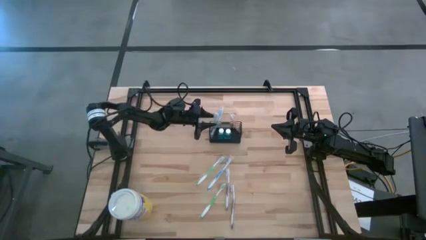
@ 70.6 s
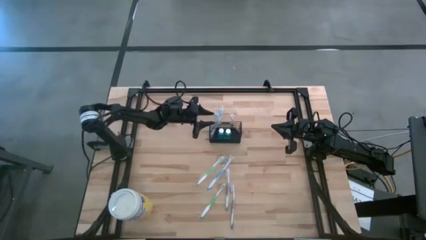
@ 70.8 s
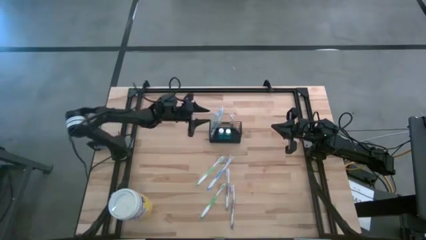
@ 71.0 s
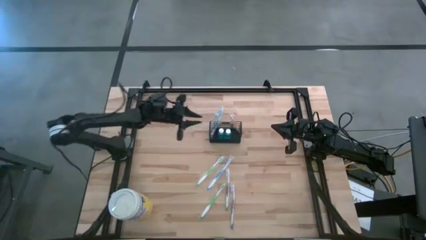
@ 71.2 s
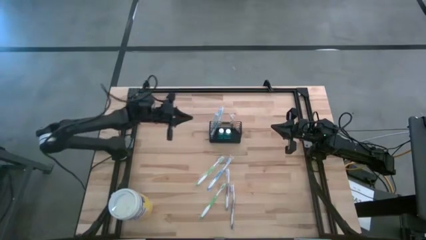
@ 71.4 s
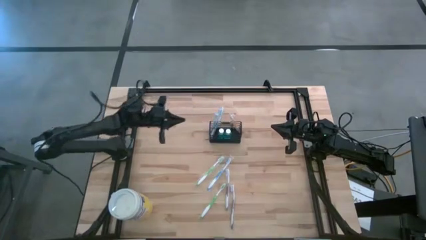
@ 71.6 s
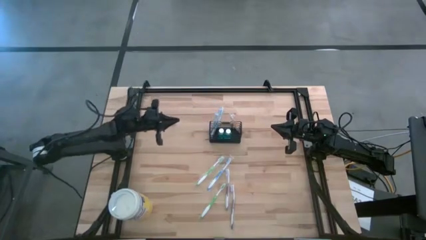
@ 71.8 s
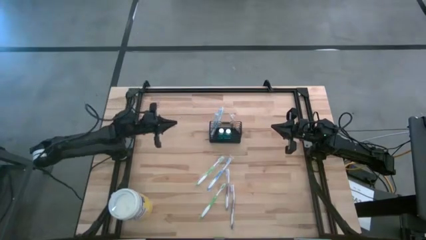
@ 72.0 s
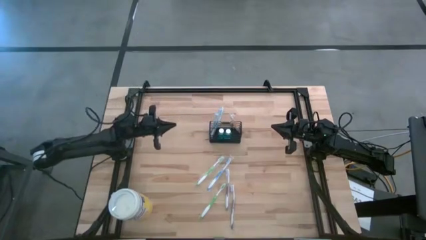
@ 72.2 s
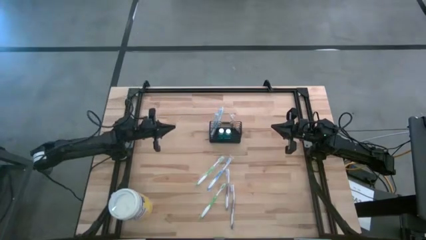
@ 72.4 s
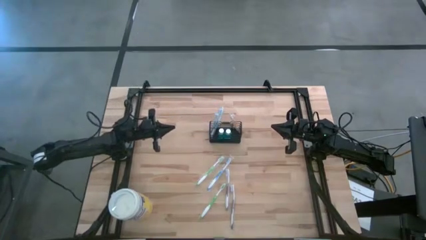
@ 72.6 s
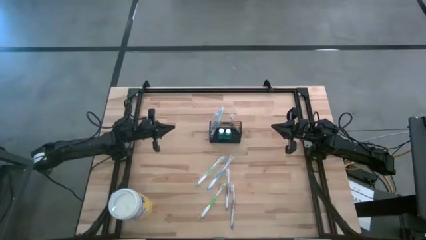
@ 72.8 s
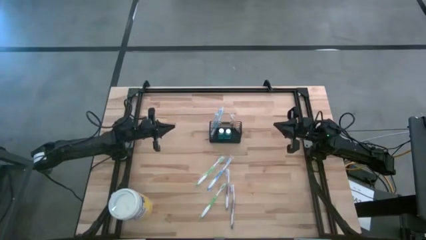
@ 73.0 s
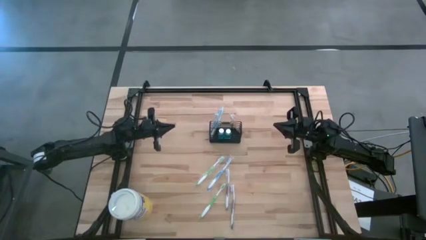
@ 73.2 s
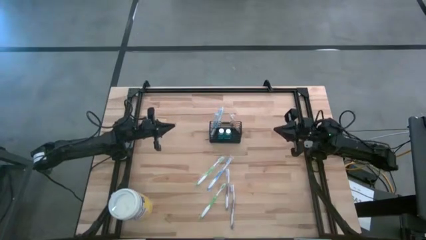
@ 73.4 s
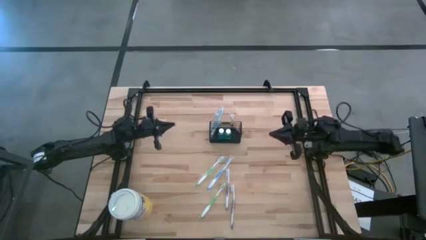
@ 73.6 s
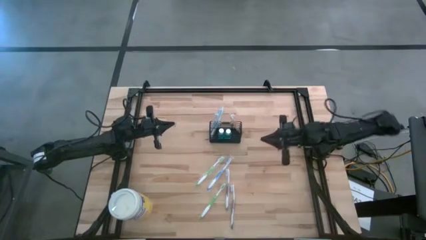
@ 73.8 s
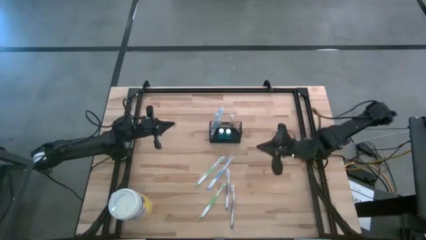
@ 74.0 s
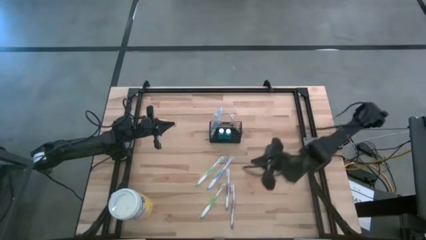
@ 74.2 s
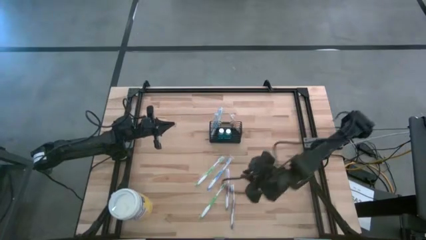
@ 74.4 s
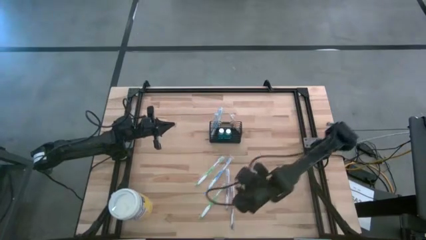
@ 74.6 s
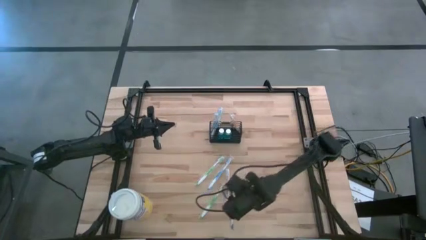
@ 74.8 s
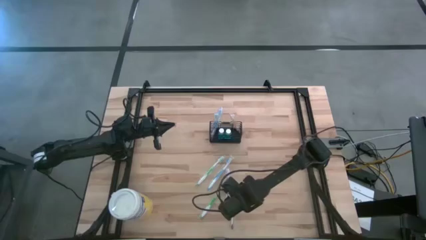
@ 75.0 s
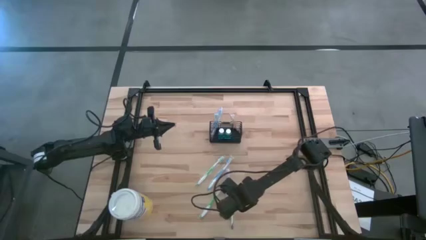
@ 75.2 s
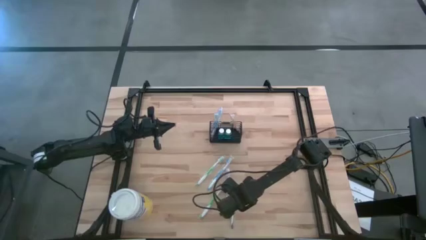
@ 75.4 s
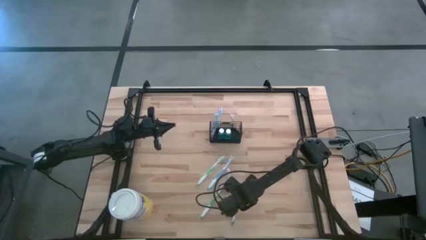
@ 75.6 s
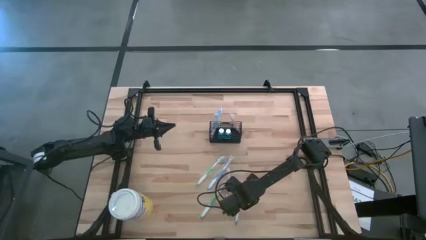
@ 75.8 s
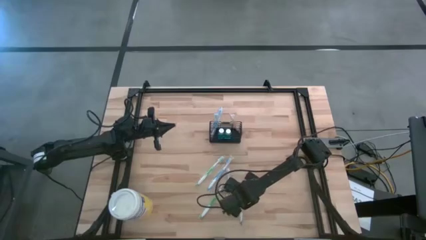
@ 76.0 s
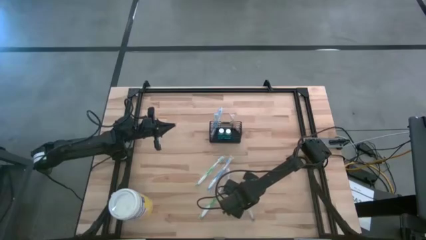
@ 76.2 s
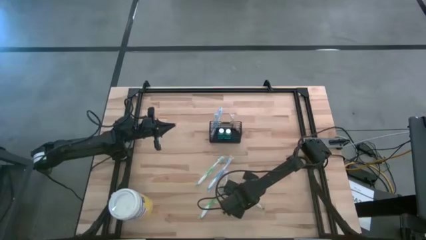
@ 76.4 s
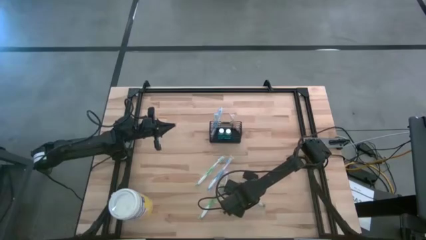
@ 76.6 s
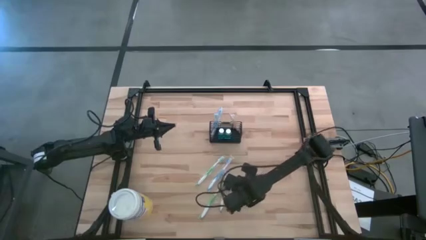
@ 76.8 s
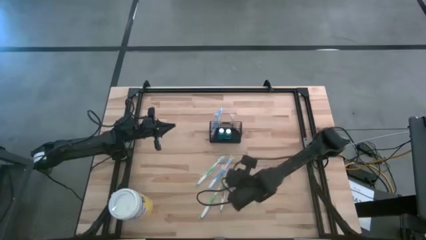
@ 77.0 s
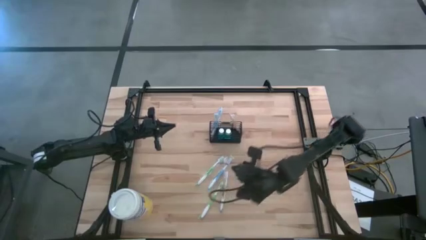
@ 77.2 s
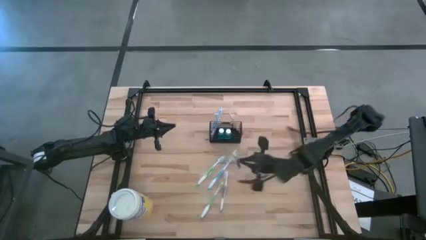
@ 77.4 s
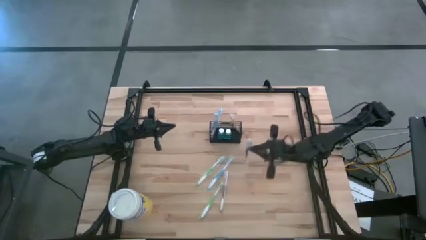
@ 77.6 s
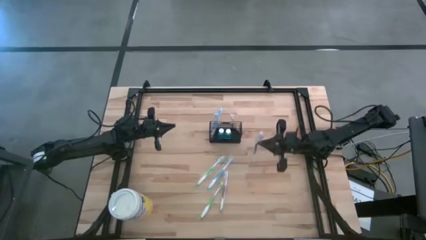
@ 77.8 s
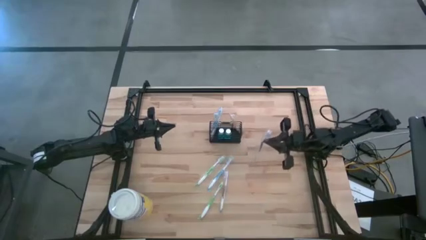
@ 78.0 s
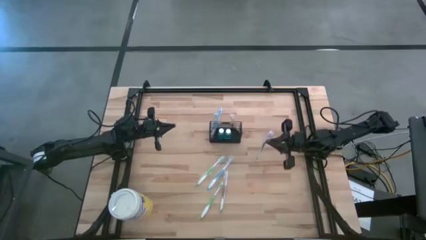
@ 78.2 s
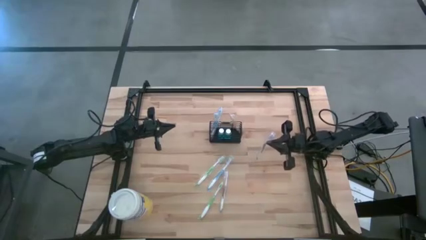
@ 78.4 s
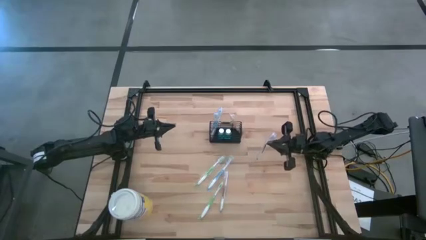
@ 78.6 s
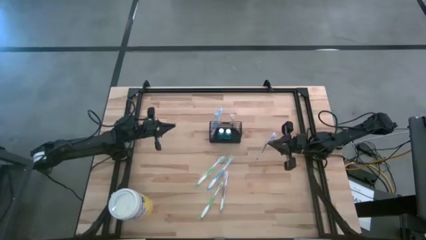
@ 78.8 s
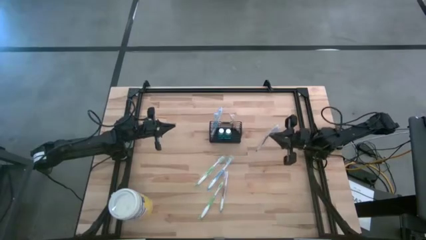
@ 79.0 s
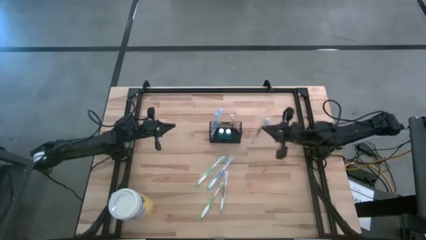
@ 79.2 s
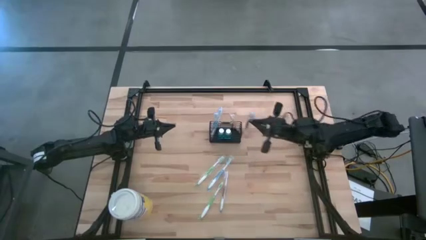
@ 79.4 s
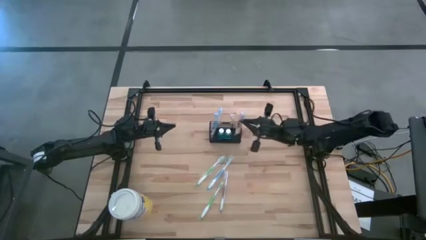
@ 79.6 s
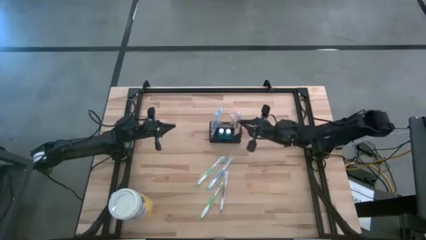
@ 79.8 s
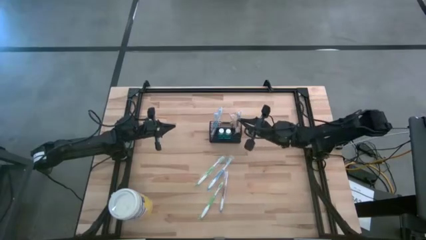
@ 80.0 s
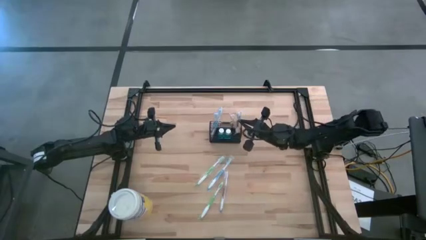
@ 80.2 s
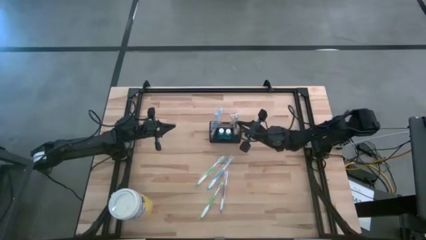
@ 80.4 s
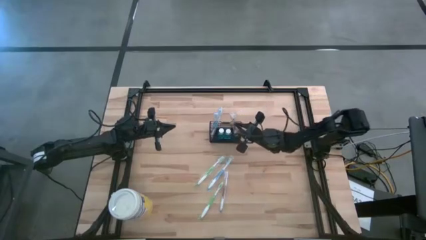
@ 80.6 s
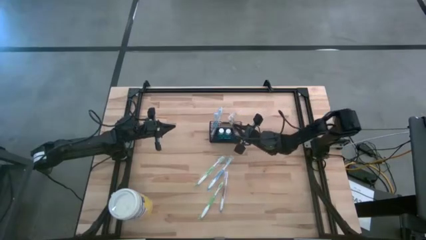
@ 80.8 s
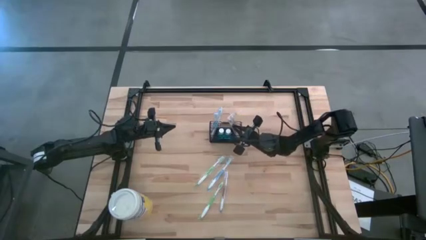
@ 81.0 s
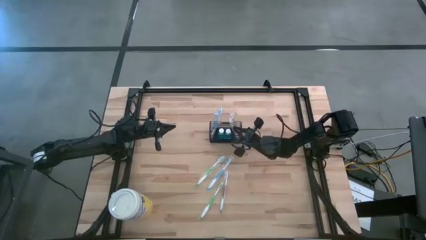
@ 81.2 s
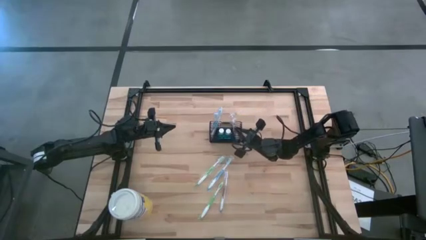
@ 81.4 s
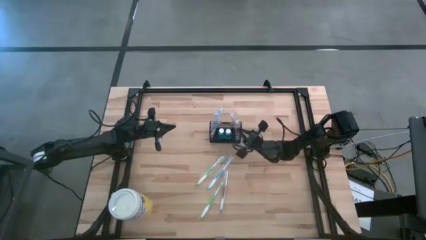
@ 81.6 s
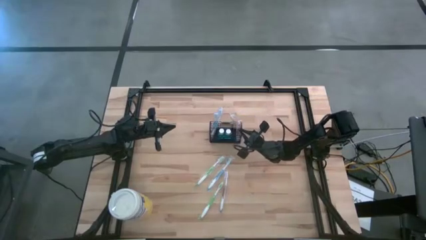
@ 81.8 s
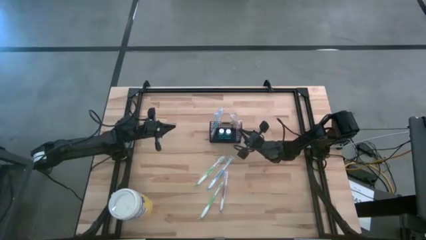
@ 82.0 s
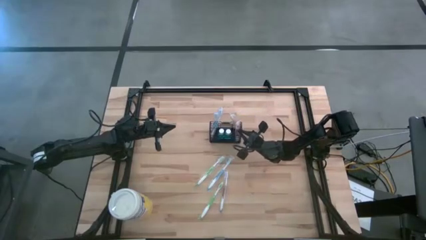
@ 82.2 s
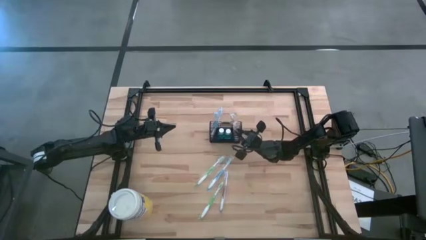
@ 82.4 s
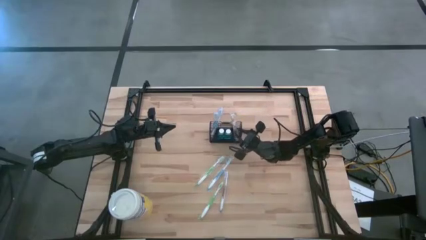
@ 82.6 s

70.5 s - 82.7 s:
Task: Pick & Place toothbrushing station
Put the right purple toothbrush into the wire organizer

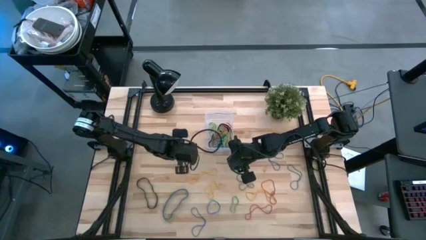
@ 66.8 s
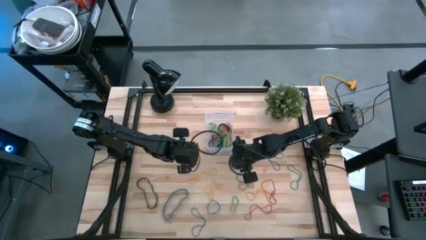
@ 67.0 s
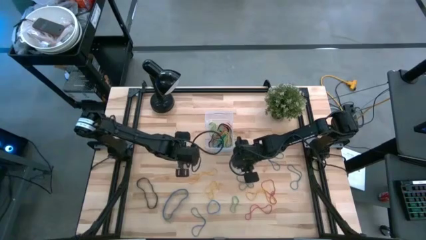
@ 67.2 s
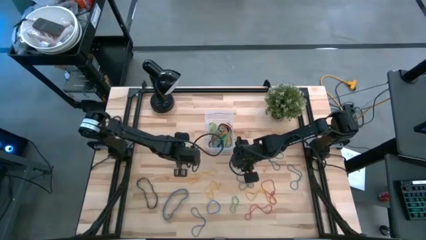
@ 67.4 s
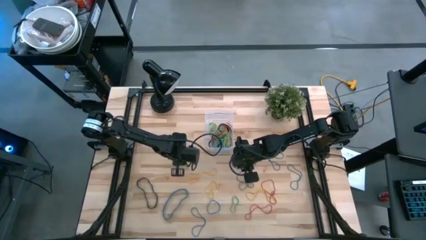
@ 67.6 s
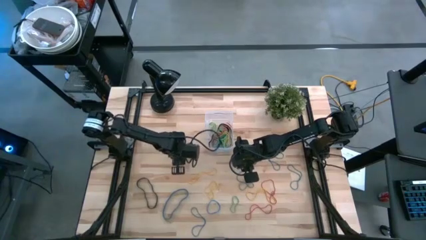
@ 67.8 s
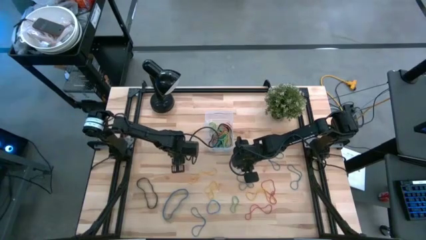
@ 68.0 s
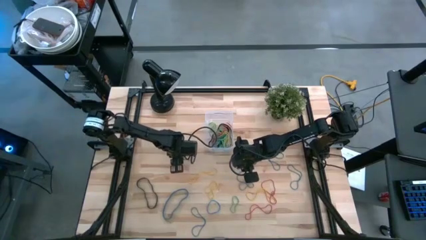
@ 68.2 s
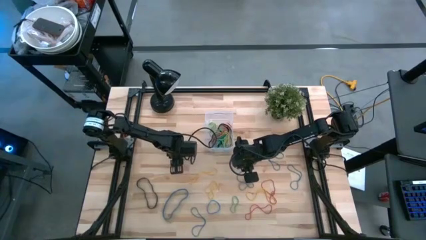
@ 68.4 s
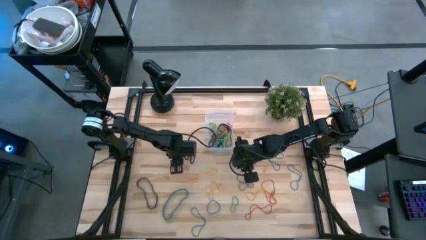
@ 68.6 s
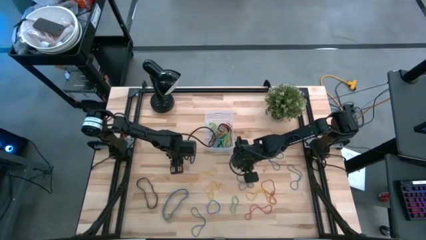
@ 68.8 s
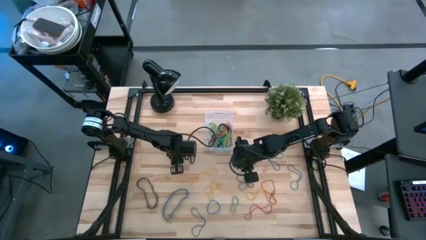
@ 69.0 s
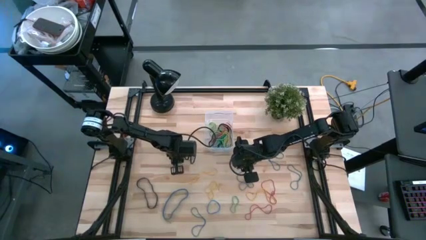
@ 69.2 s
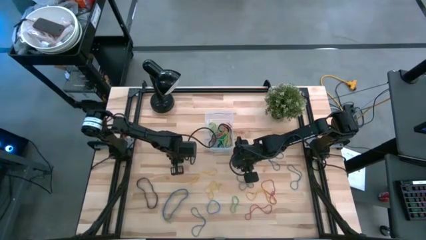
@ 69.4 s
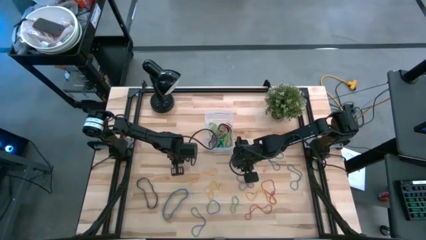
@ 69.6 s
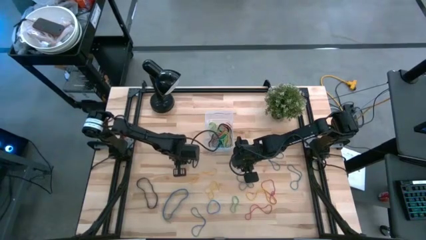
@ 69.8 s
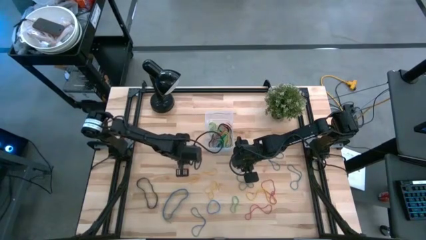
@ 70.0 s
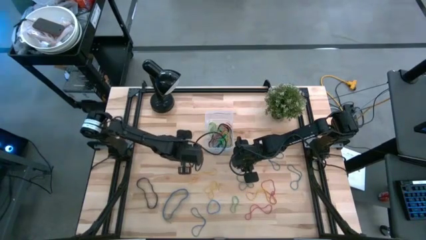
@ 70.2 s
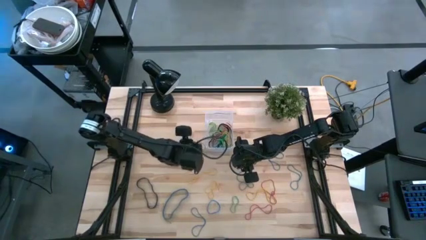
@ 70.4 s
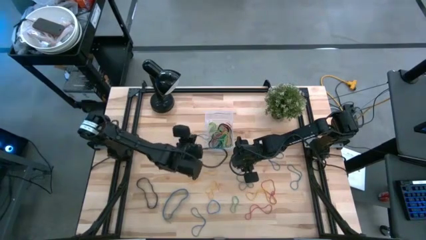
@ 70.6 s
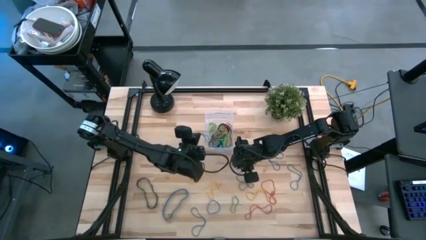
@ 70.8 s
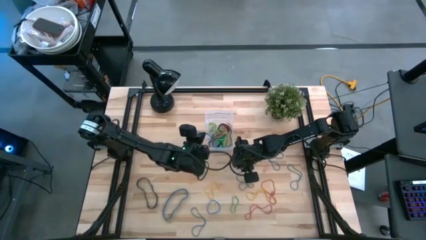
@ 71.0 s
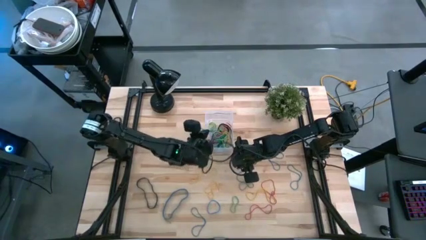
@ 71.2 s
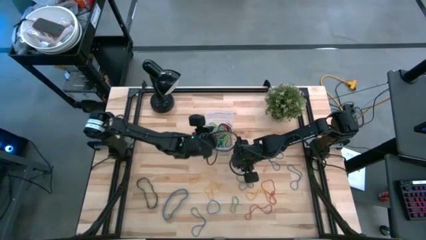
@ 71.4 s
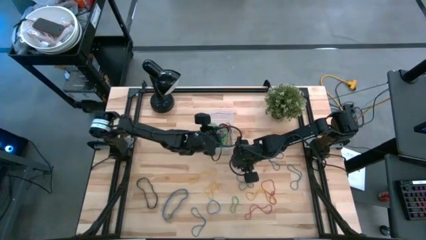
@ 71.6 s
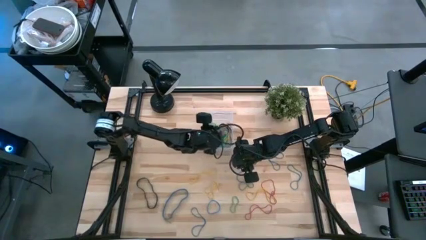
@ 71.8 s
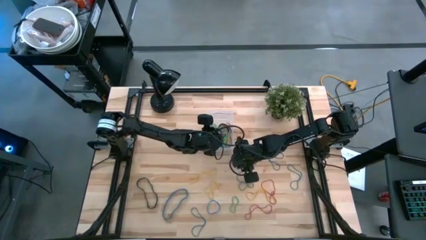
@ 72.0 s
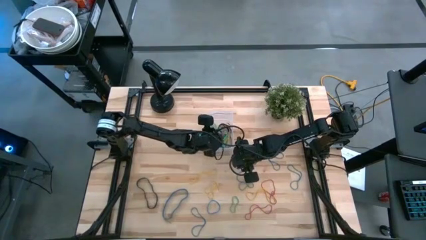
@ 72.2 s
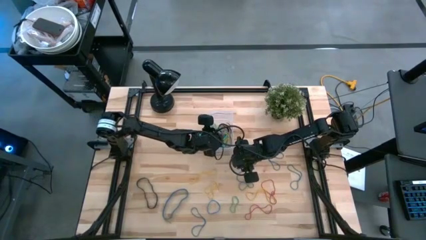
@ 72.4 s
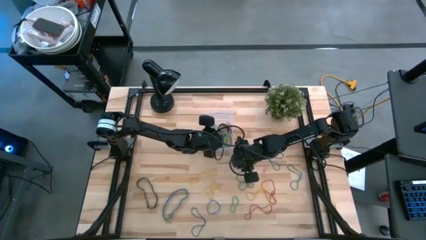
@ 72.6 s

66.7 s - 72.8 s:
Task: Pick and place rubber bands into bin
Put blue rubberband into the transparent bin
